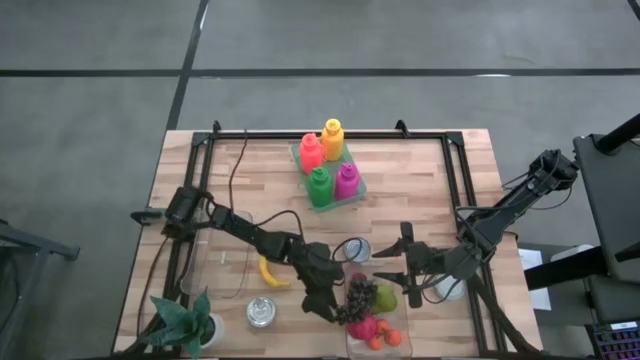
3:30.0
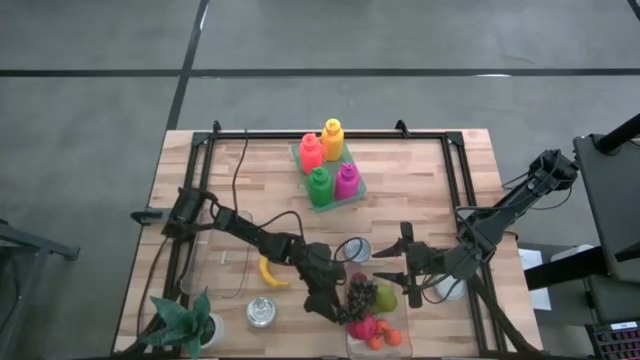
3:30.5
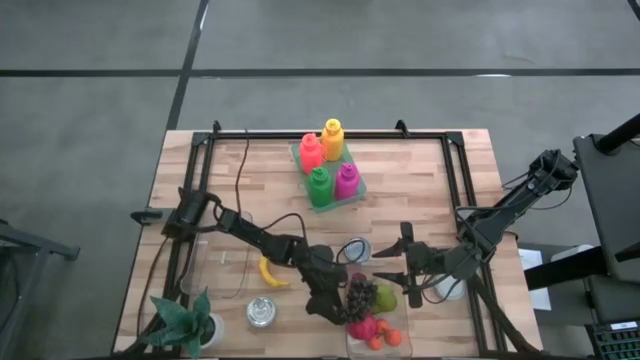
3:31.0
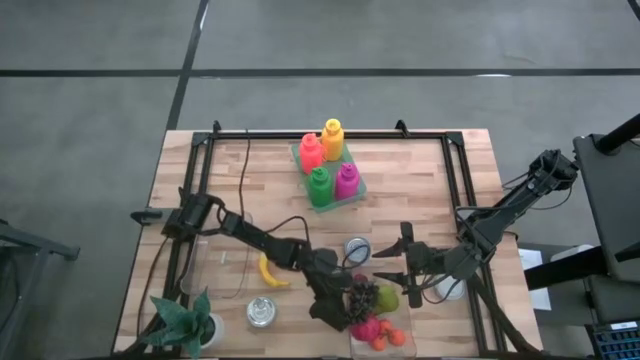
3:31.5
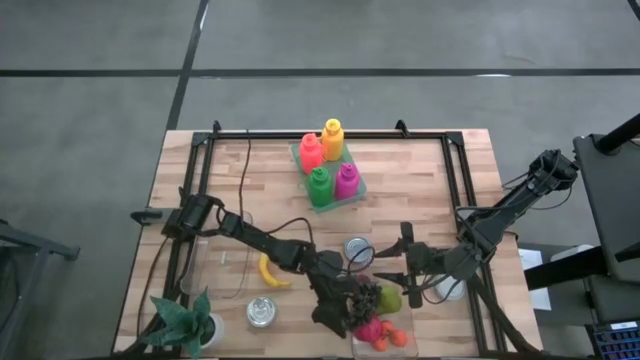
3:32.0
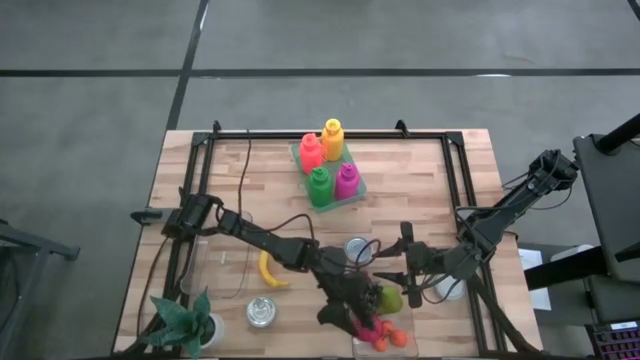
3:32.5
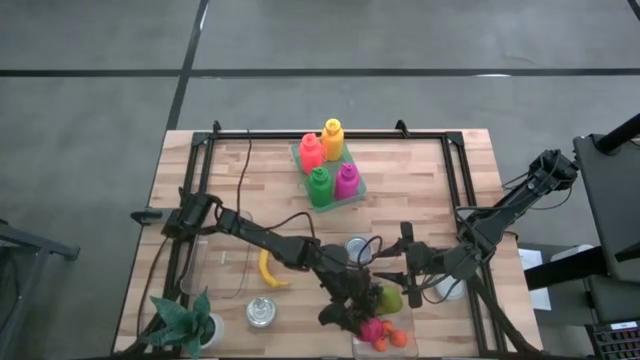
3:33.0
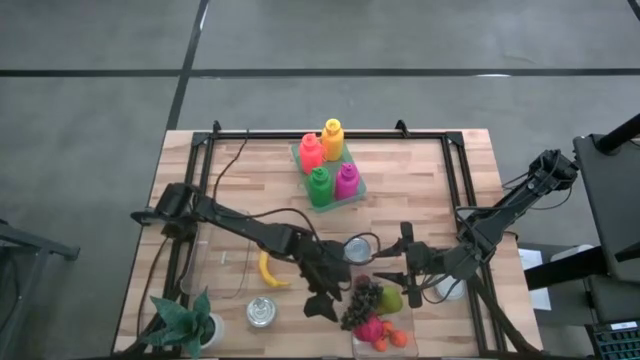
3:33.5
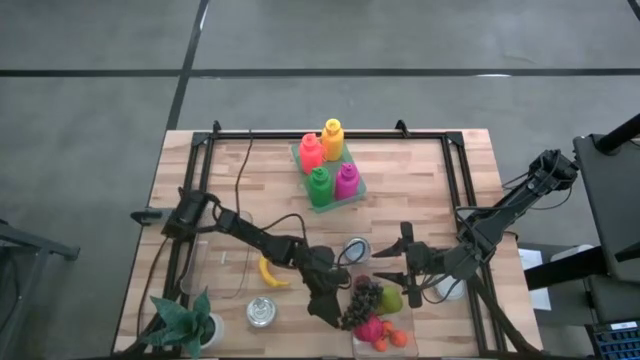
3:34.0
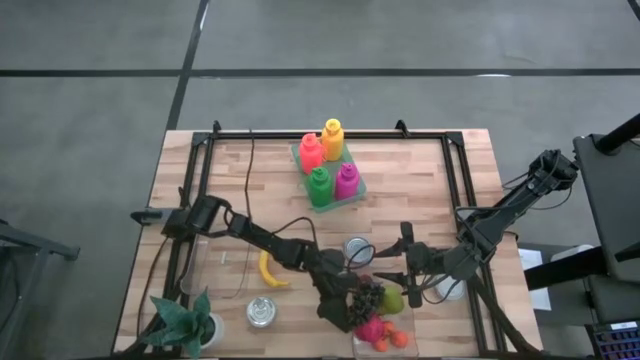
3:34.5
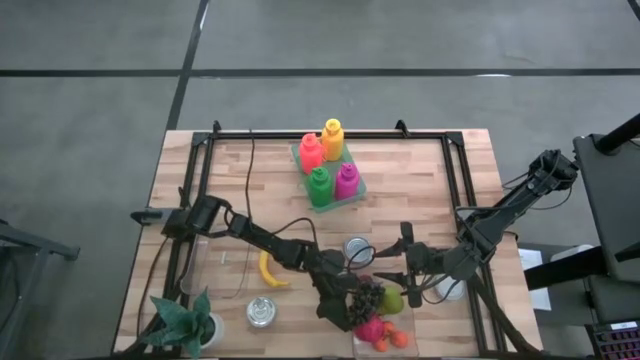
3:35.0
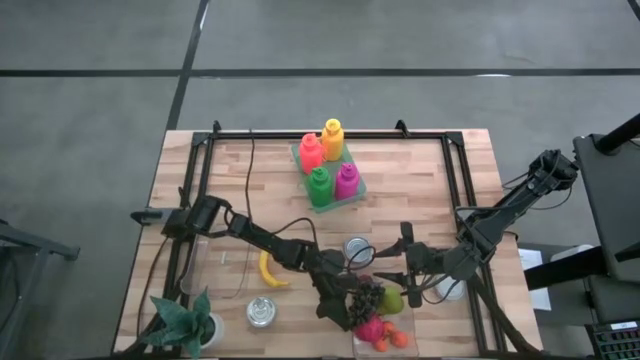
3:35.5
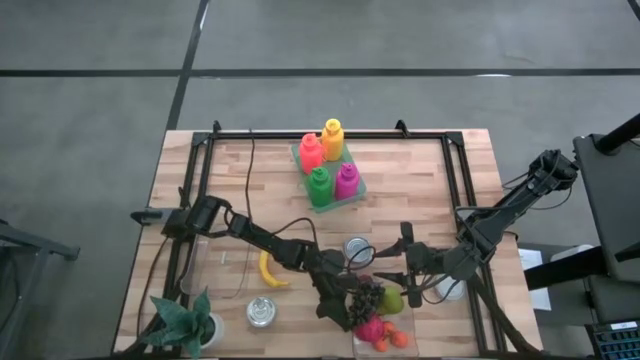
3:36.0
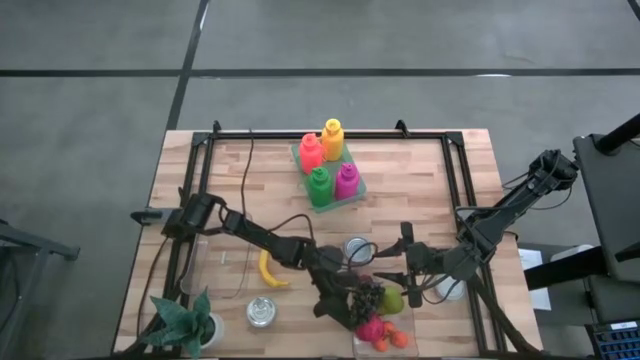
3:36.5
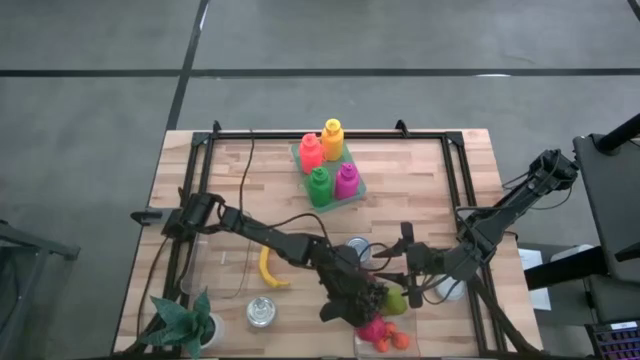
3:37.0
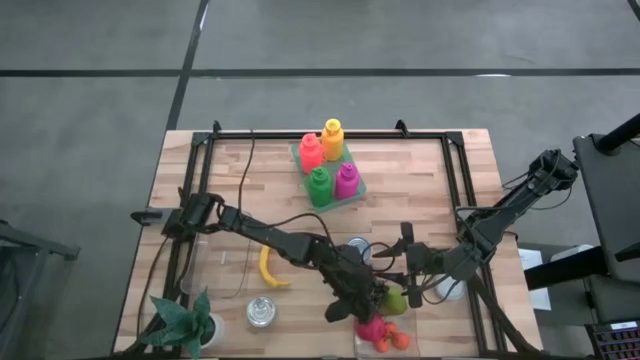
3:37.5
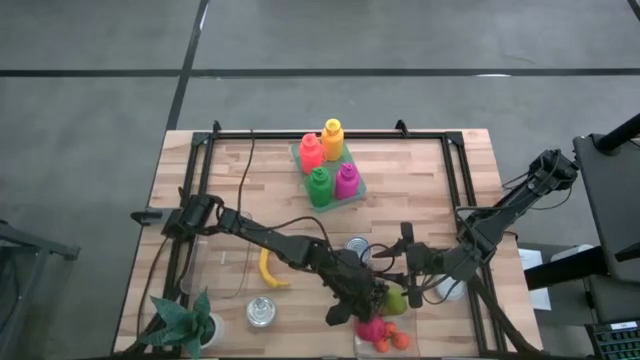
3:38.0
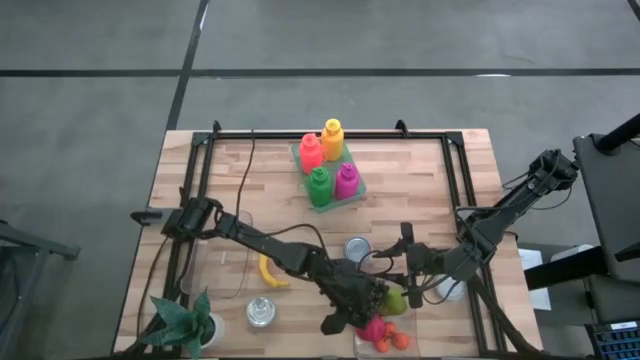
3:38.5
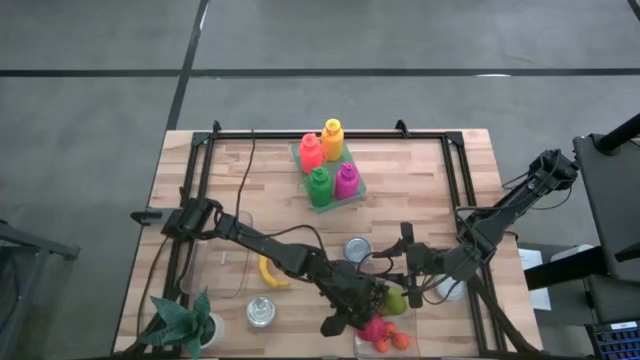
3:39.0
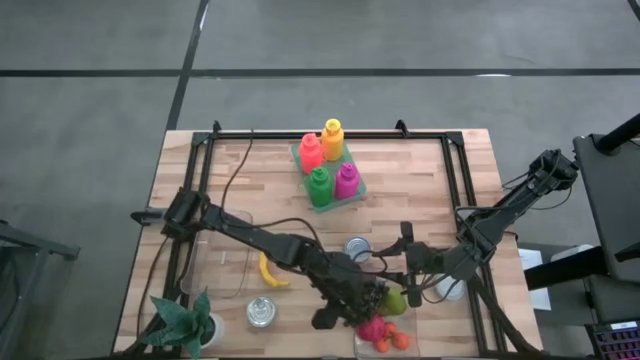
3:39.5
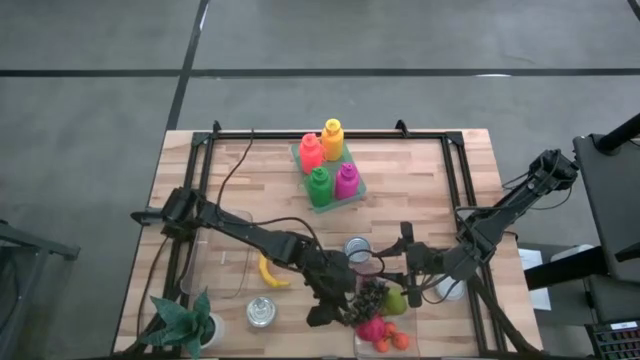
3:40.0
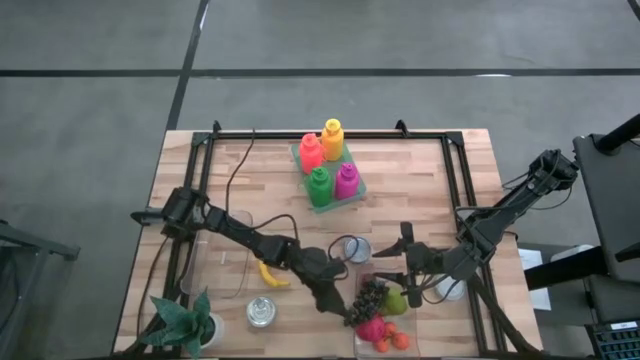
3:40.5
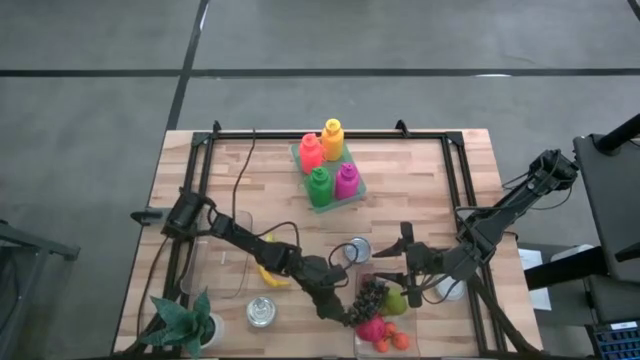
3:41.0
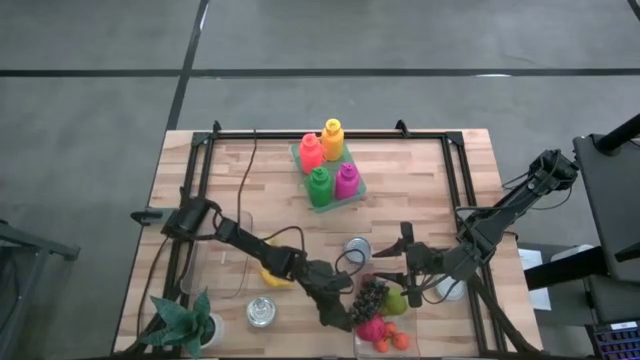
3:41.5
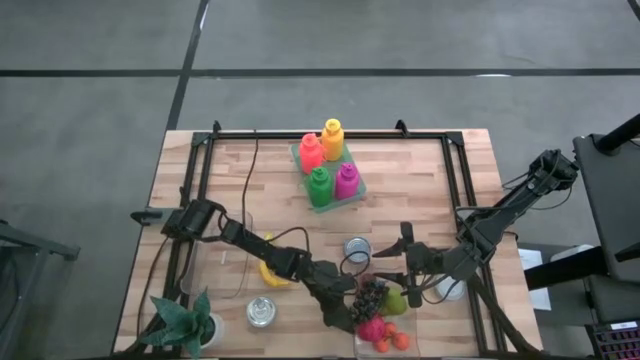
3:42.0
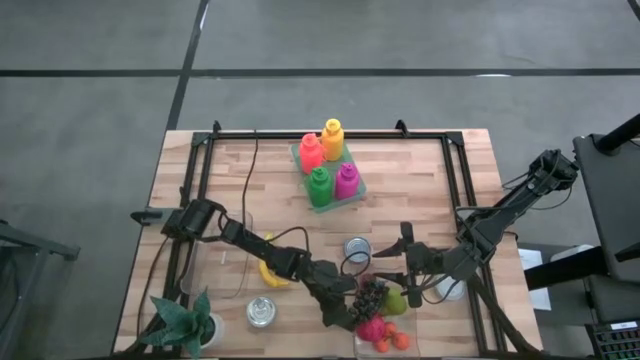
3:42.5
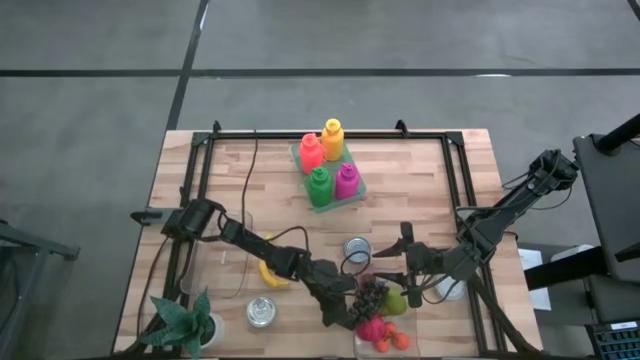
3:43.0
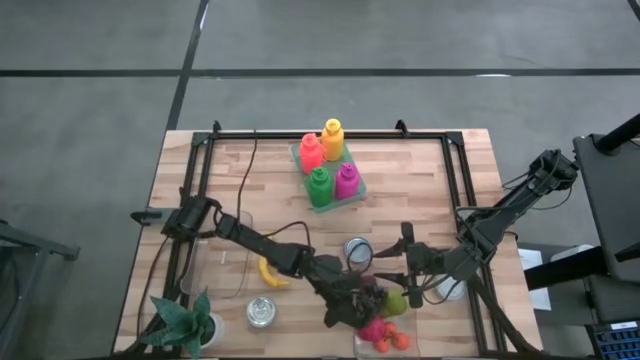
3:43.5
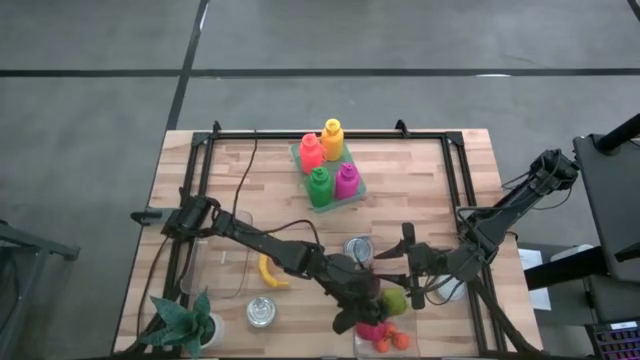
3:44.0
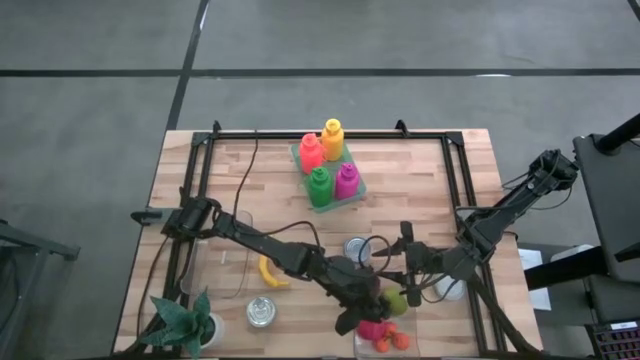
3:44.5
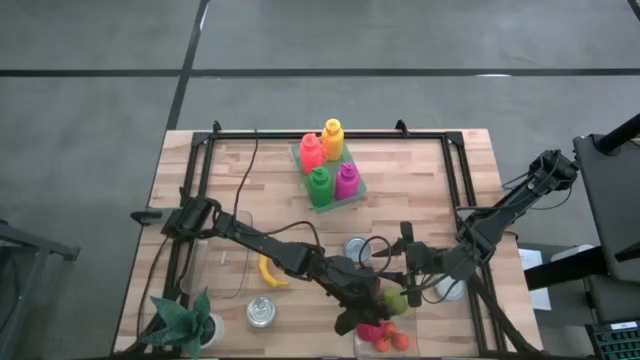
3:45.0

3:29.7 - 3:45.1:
Task: Pick & Place Food Item
Put the black grapes into the bottom transparent bin

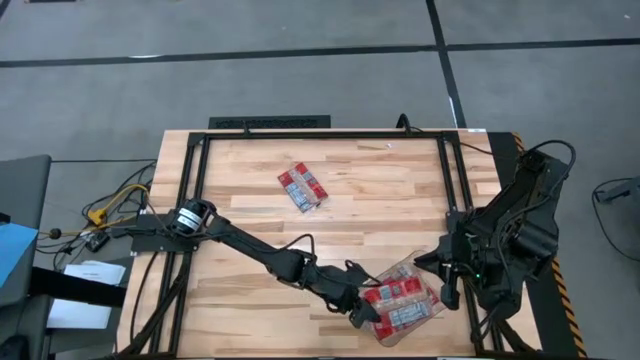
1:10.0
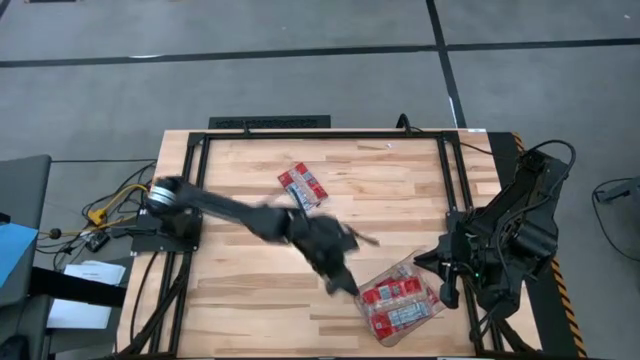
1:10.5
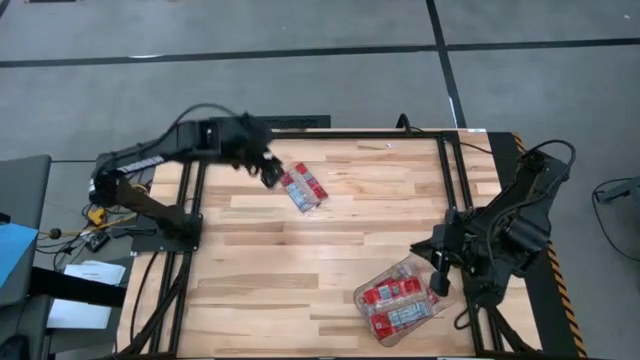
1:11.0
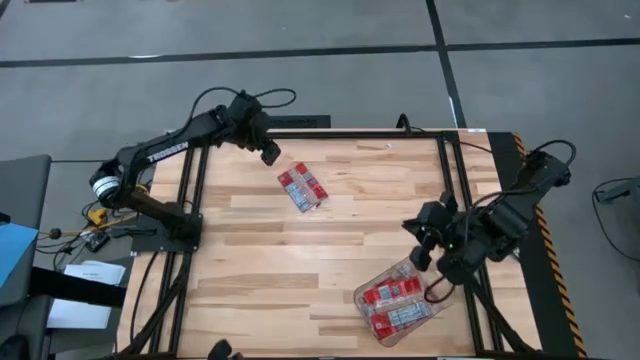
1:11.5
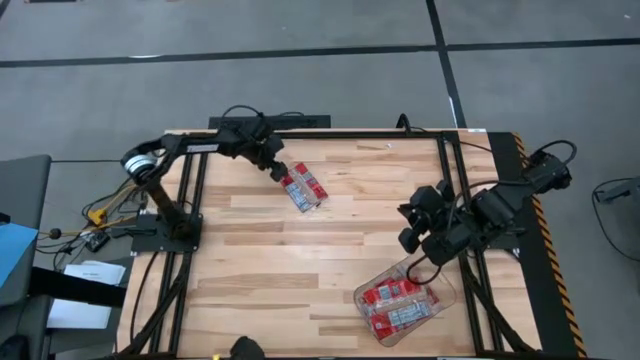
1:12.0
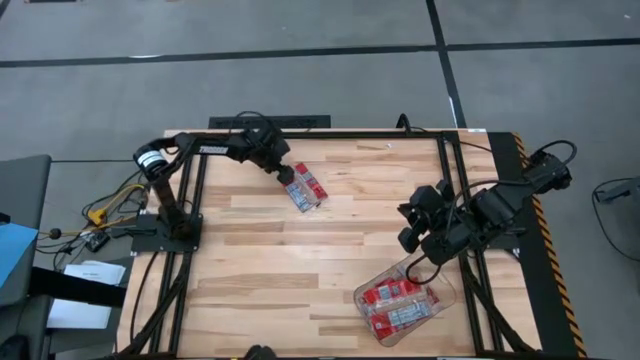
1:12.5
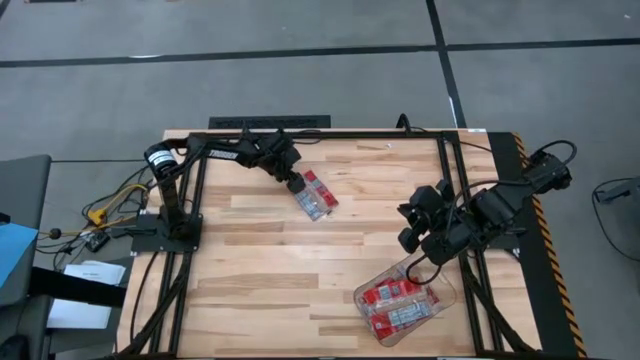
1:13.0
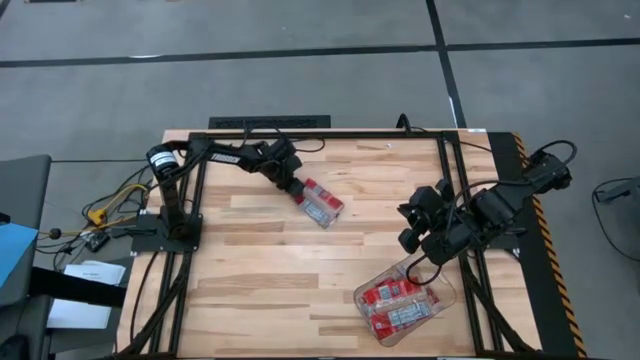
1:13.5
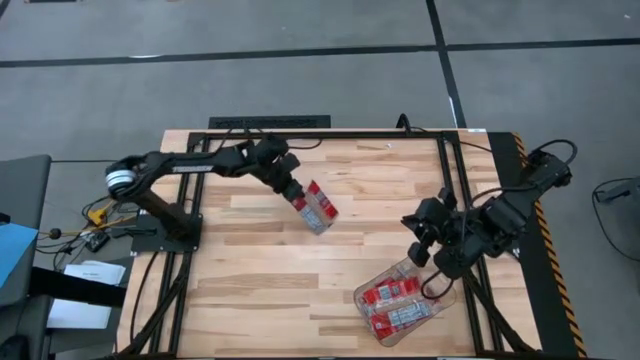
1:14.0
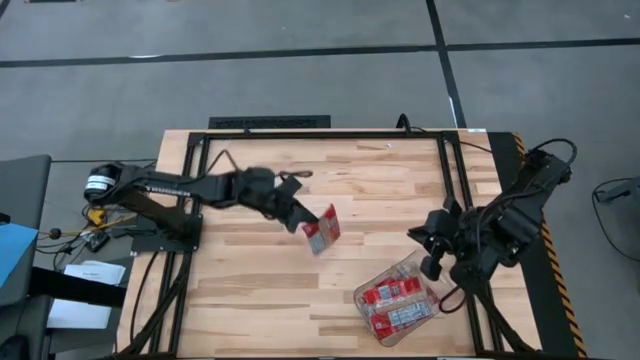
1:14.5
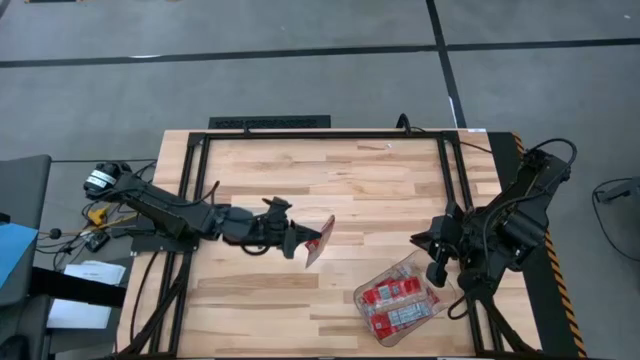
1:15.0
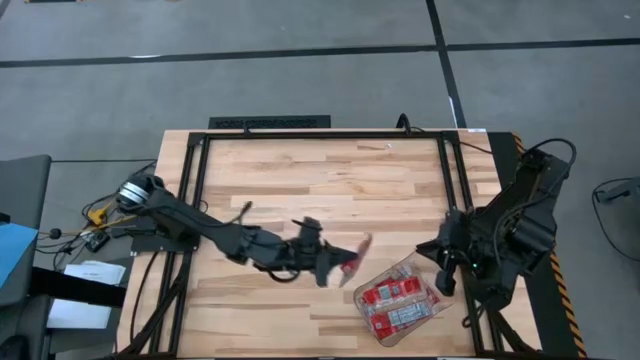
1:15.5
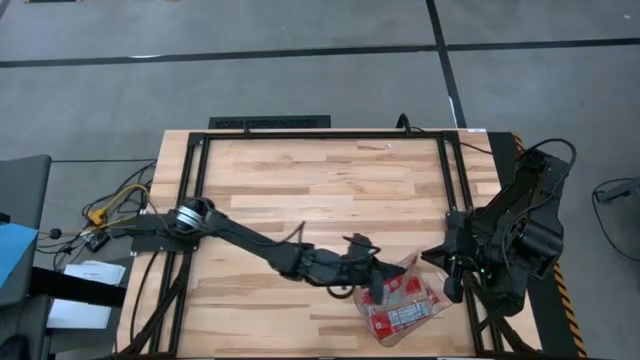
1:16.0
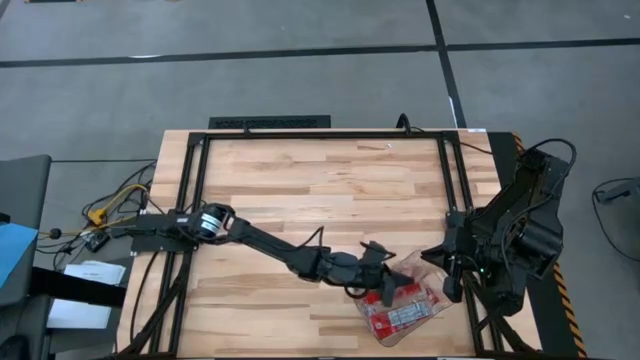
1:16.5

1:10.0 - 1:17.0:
Task: Sort popcorn bags into baskets
Put the red popcorn bag into the transparent bin
